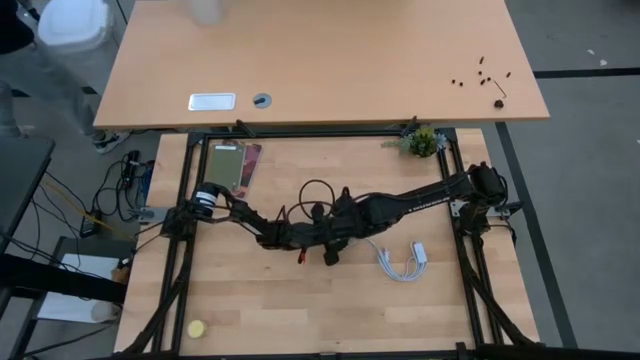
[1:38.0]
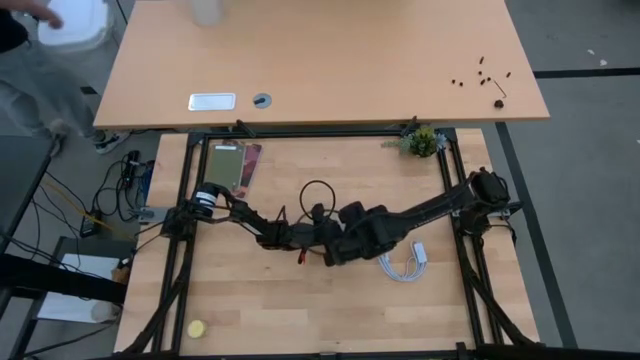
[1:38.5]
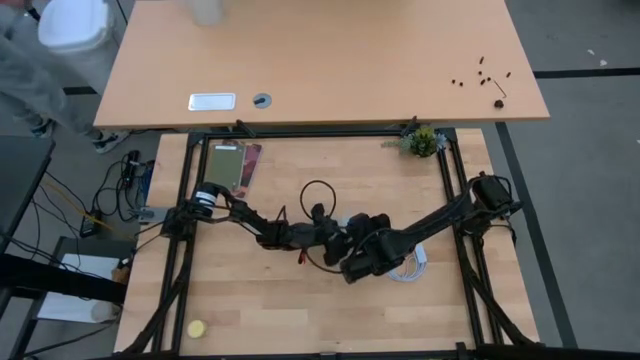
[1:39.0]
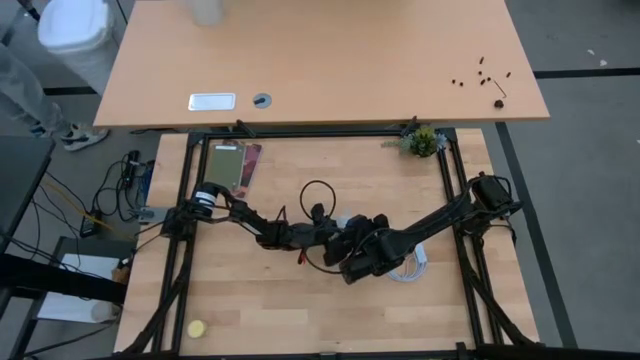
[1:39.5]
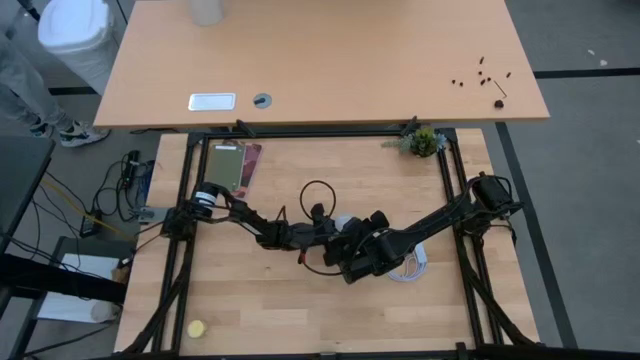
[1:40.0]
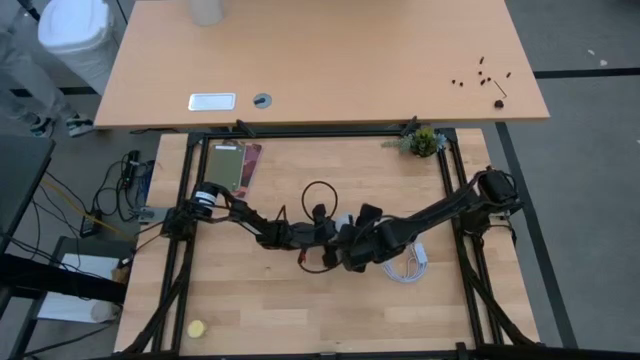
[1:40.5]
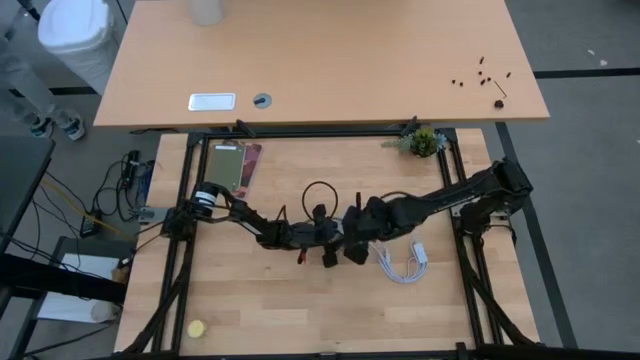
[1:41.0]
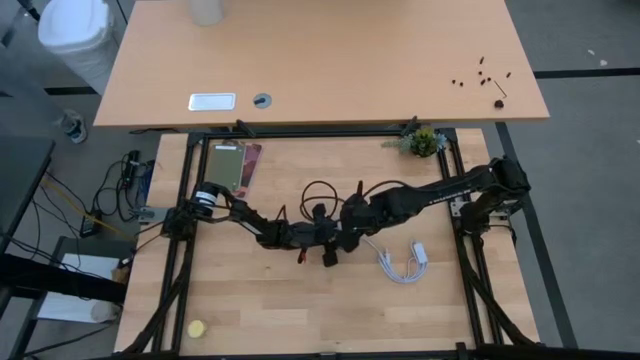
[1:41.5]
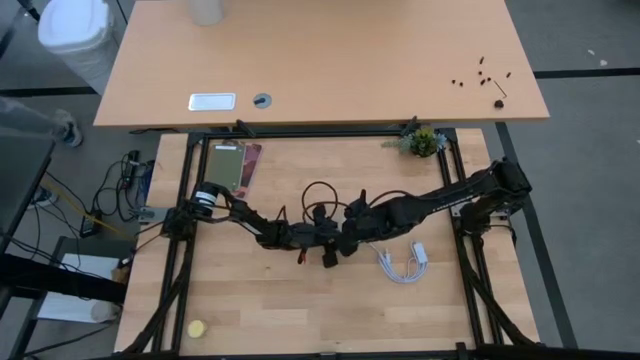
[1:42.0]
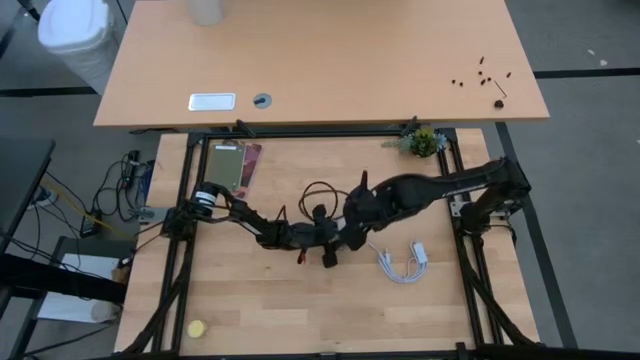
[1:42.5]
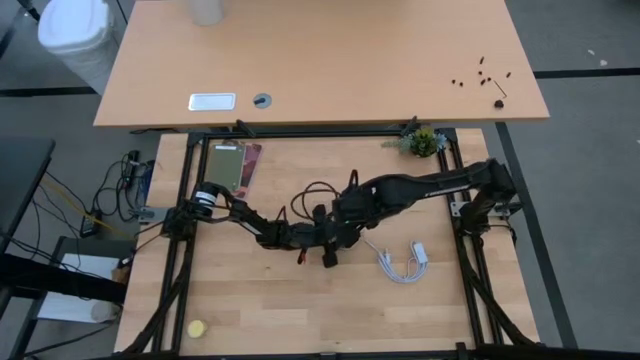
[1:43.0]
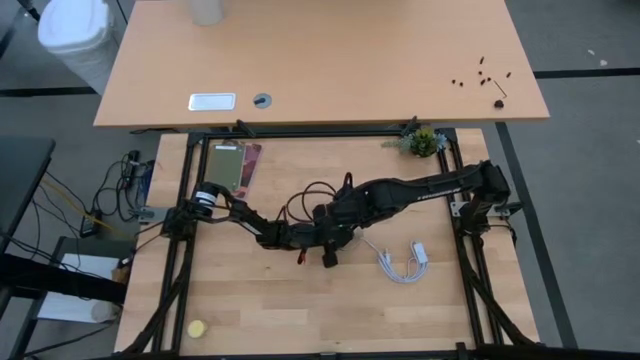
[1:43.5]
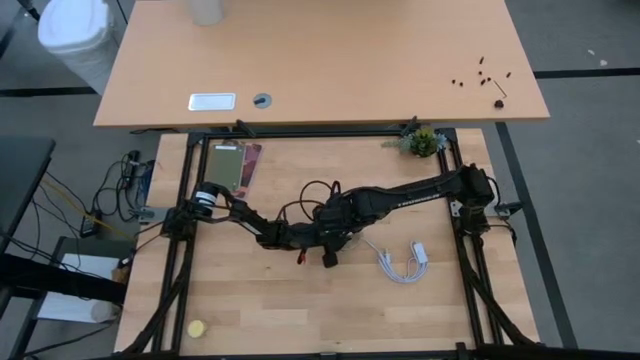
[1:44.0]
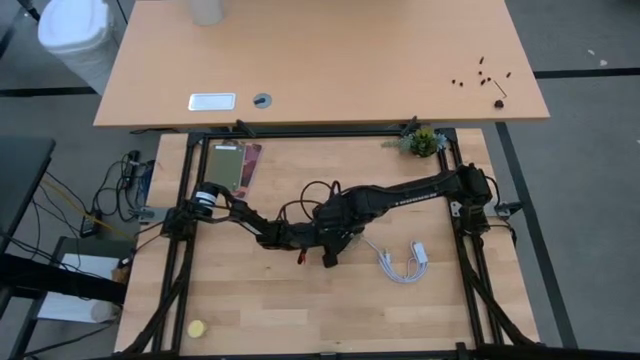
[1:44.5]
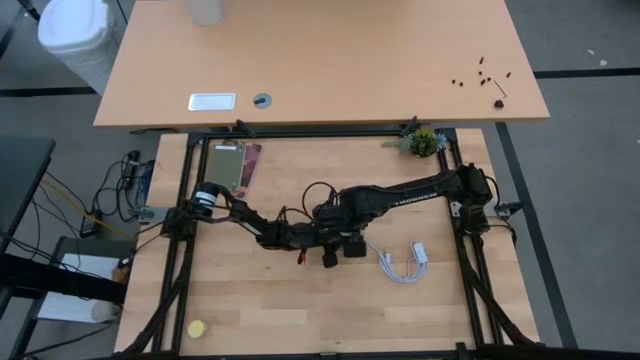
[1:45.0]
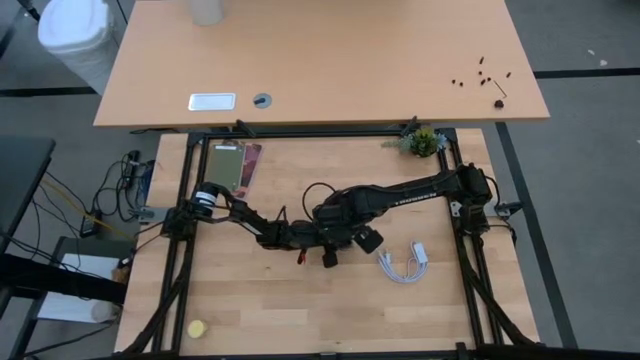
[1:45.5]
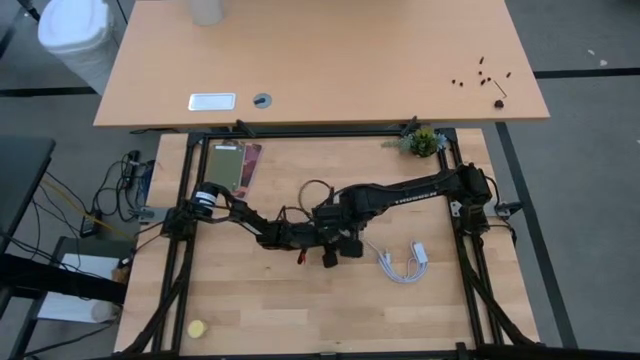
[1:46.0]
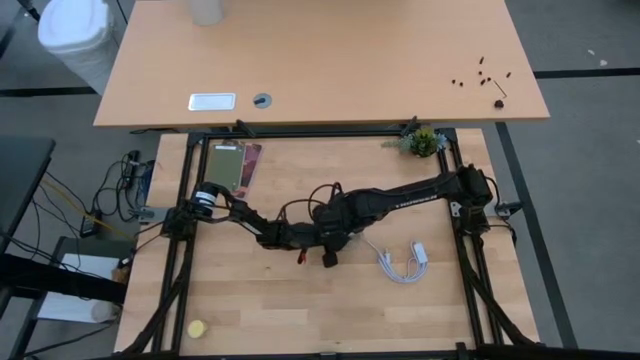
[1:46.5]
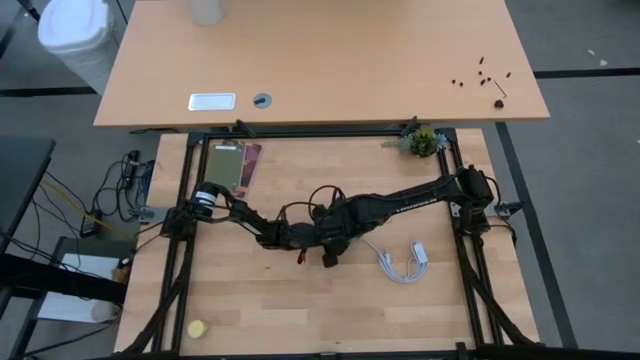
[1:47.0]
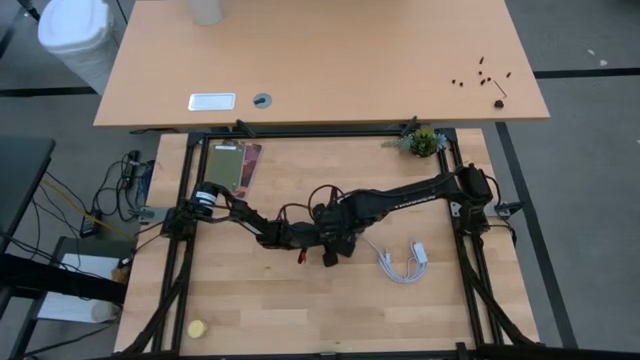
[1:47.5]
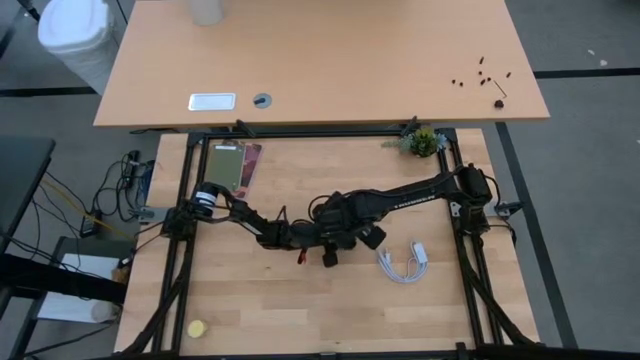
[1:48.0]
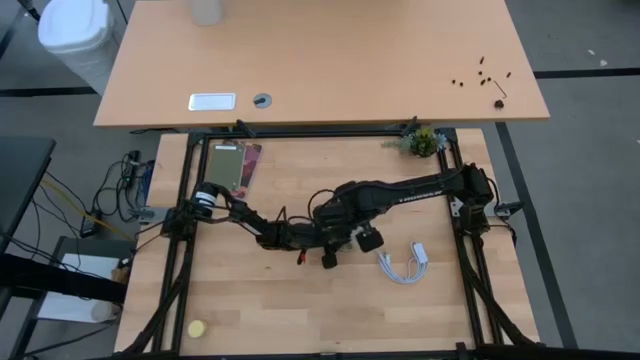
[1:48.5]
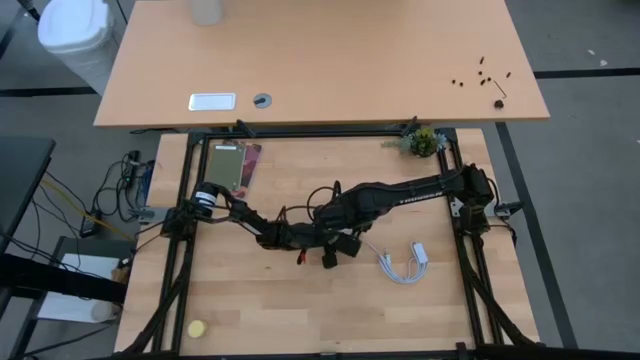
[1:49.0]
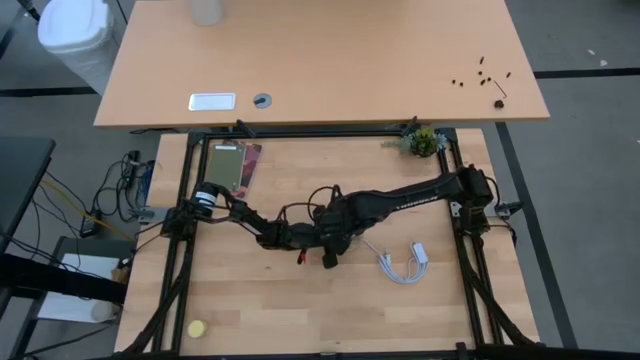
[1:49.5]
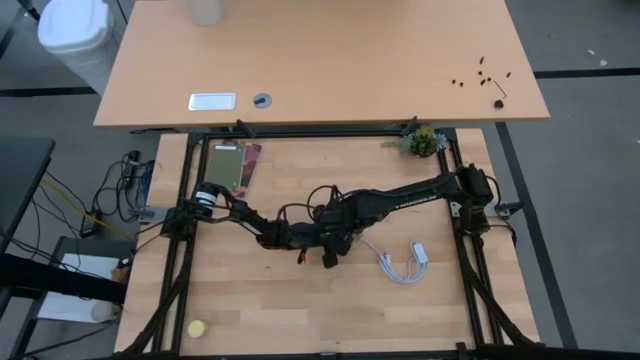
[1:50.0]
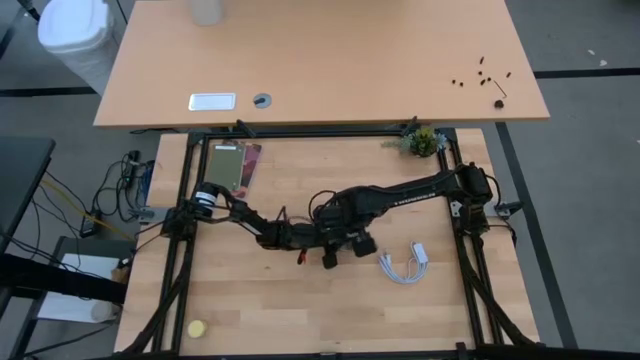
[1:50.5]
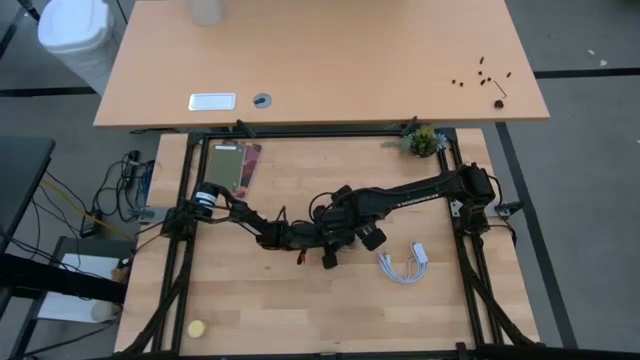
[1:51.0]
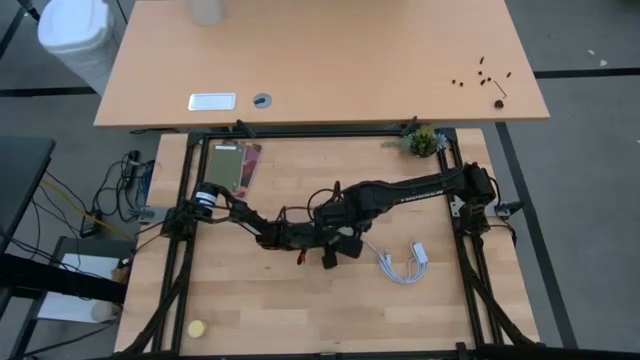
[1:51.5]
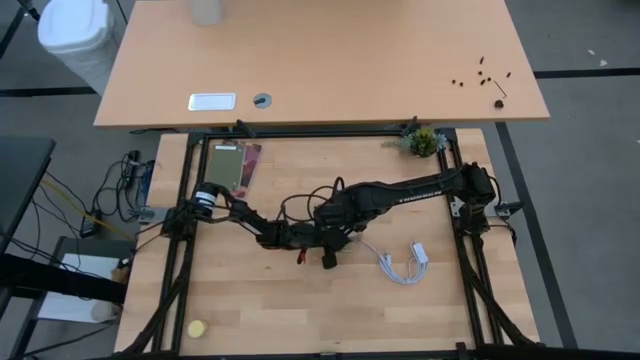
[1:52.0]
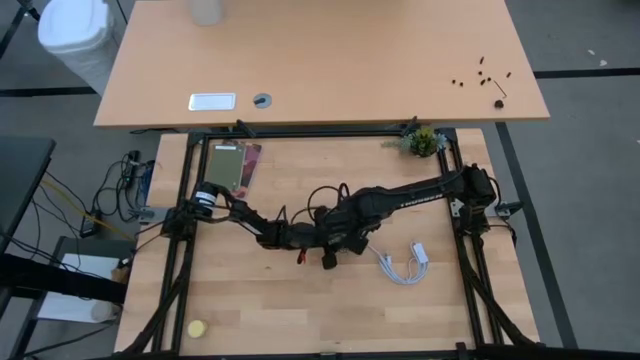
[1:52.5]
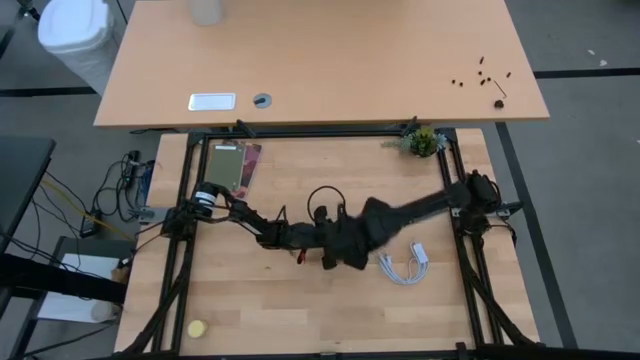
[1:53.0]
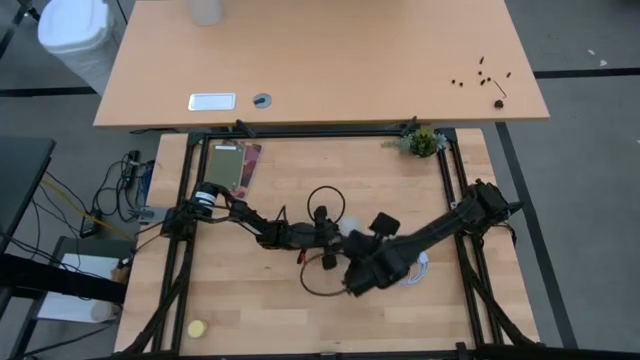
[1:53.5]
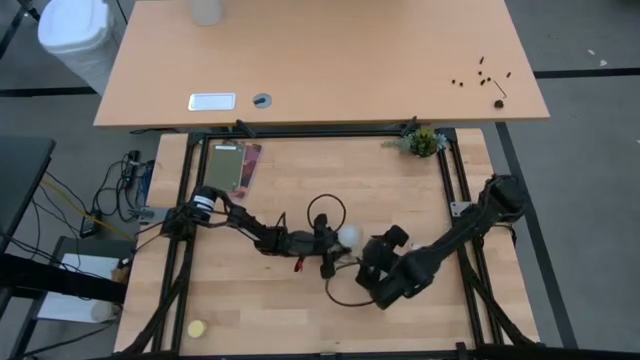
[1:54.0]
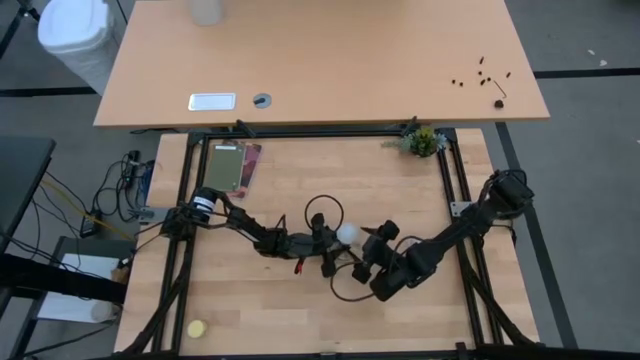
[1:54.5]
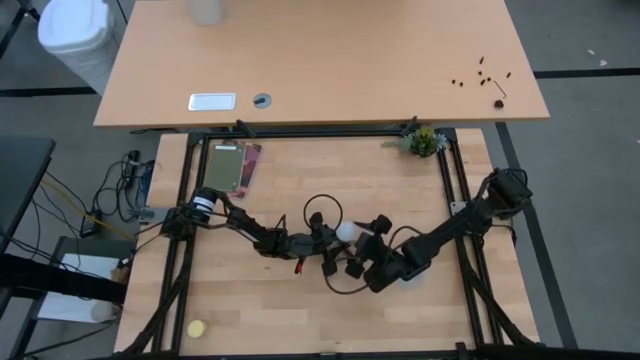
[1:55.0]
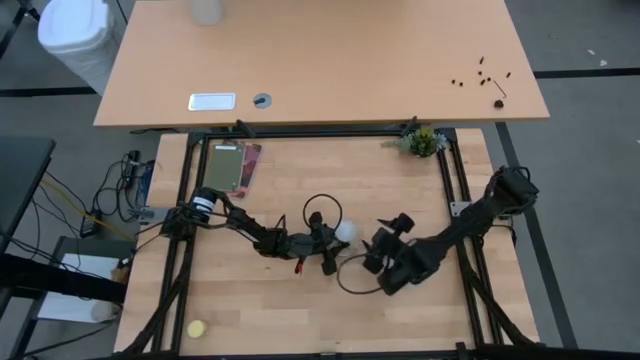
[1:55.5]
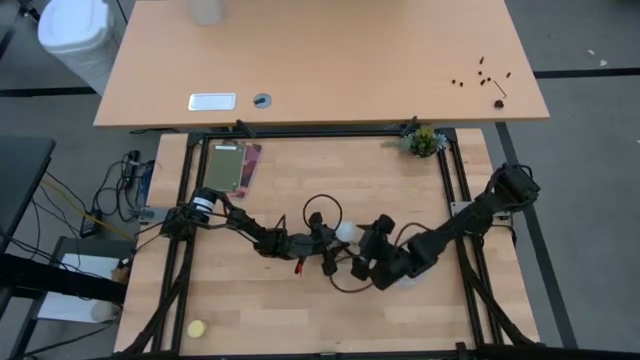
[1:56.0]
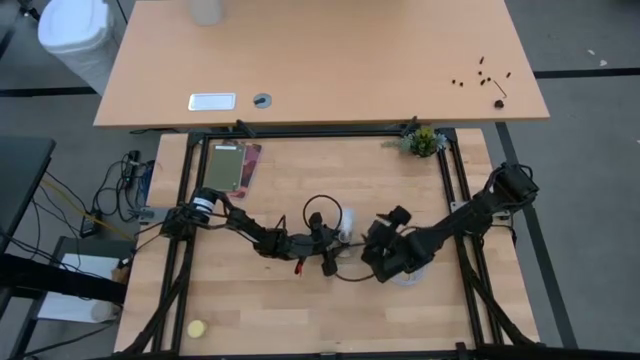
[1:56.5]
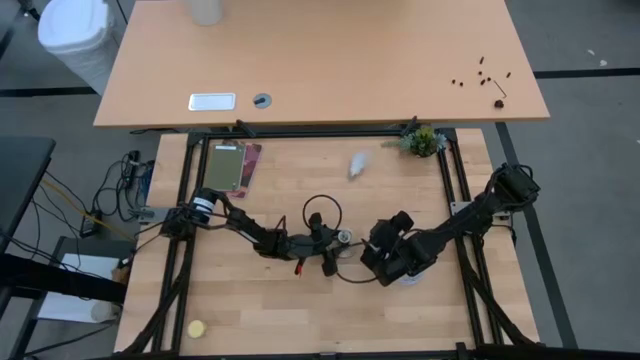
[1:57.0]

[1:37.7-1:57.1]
Task: Screw lightbulb
Remove the white lightbulb from the desk lamp

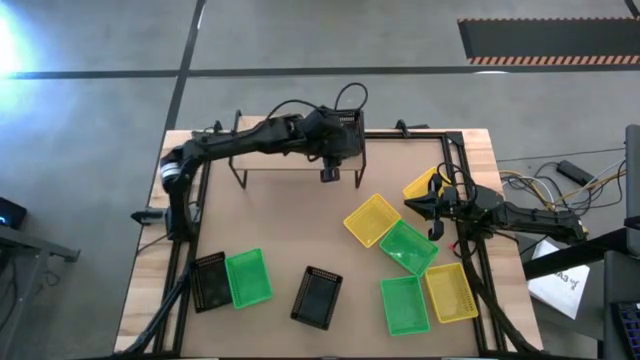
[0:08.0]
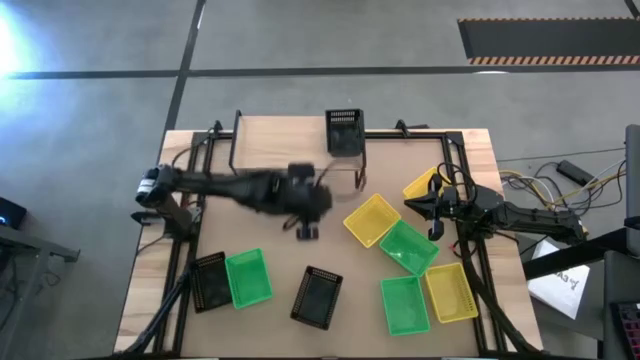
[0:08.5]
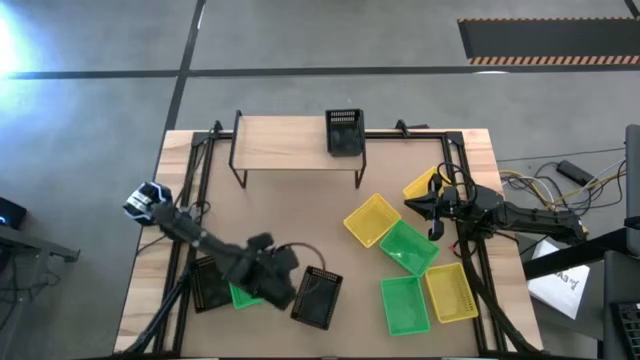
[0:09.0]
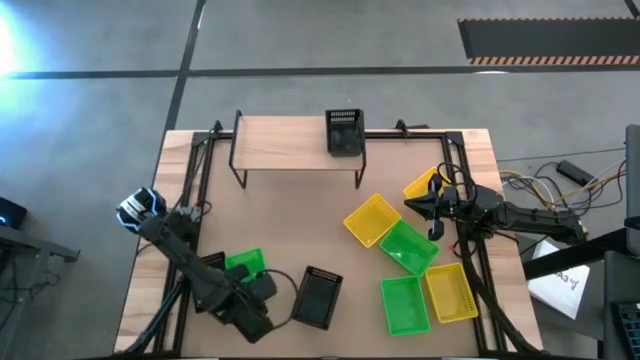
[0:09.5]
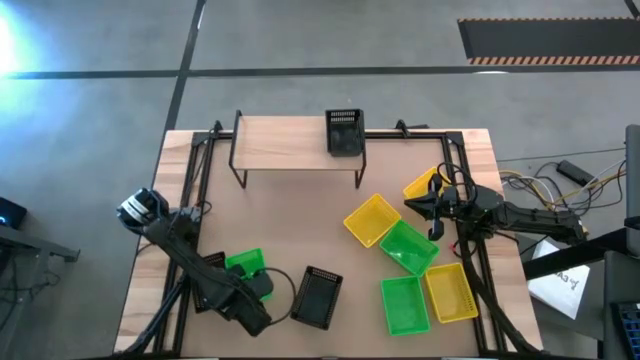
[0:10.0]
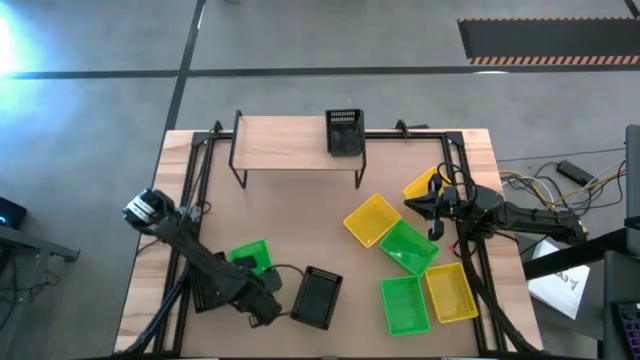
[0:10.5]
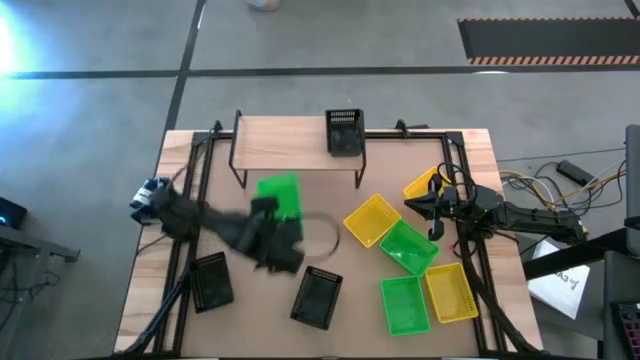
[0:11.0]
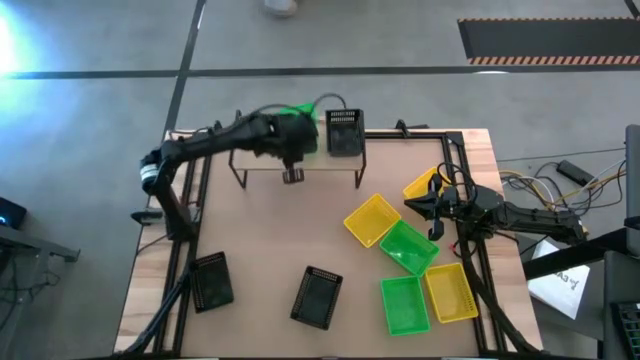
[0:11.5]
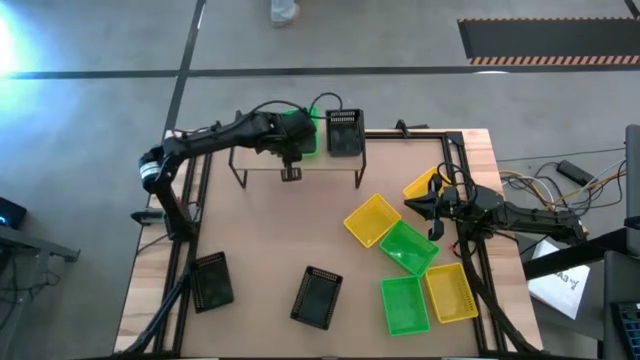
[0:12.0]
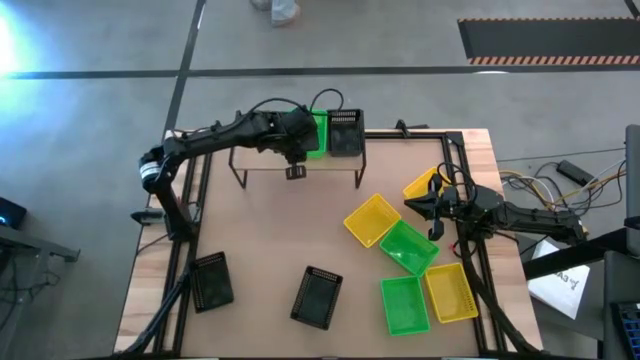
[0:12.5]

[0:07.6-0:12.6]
Task: Stack baskets on shelf by color
Put the left green basket on the shelf
